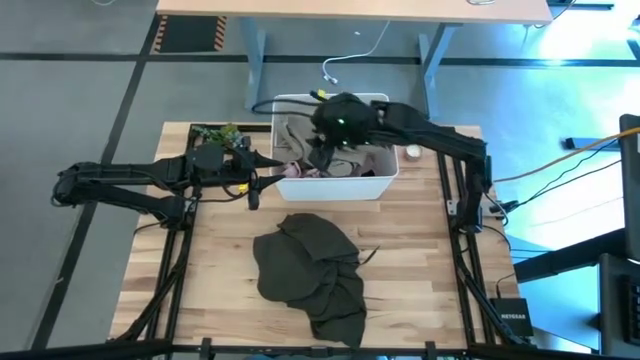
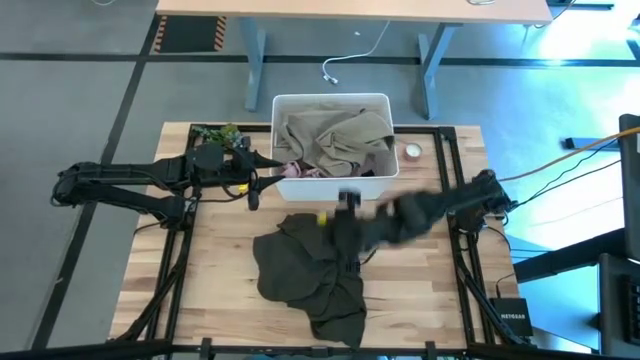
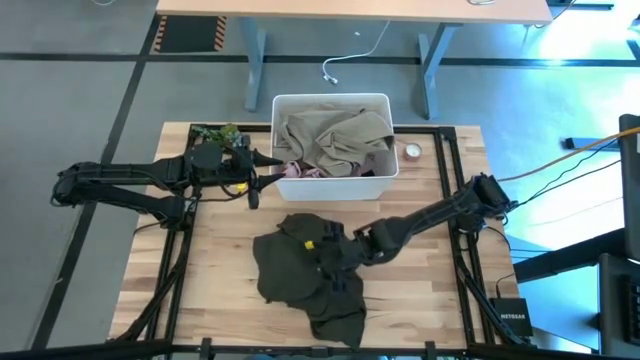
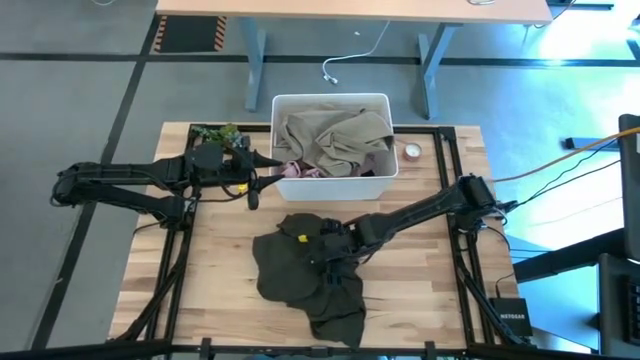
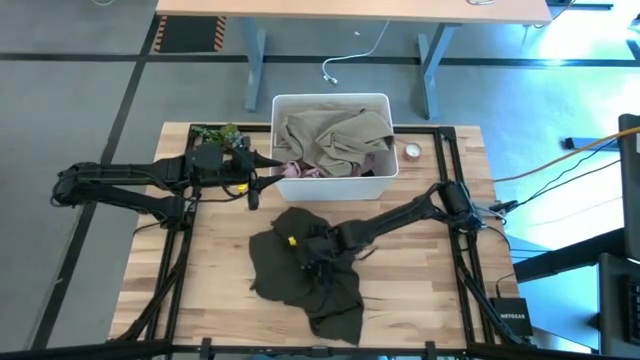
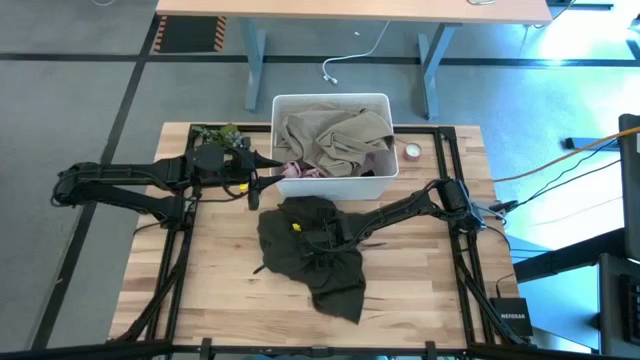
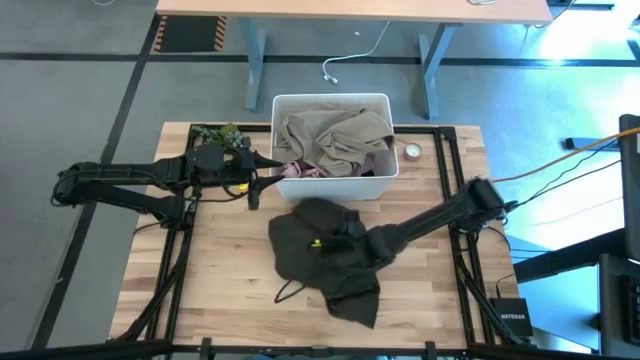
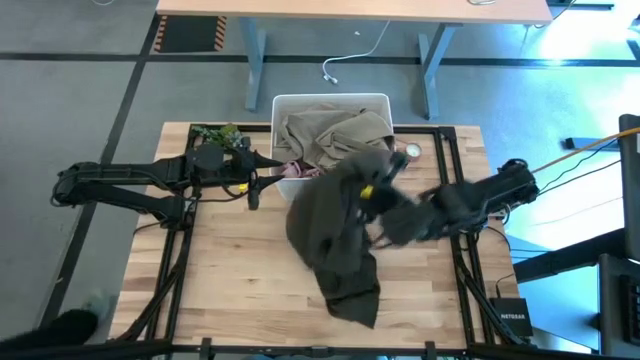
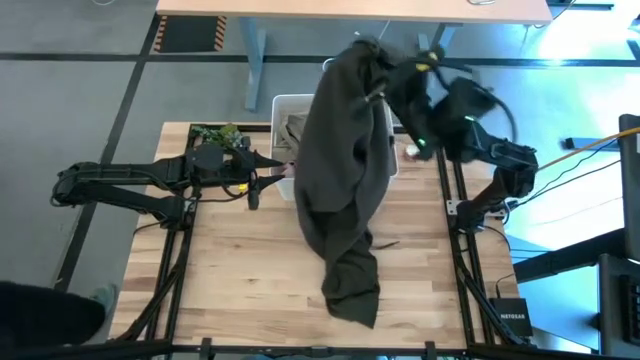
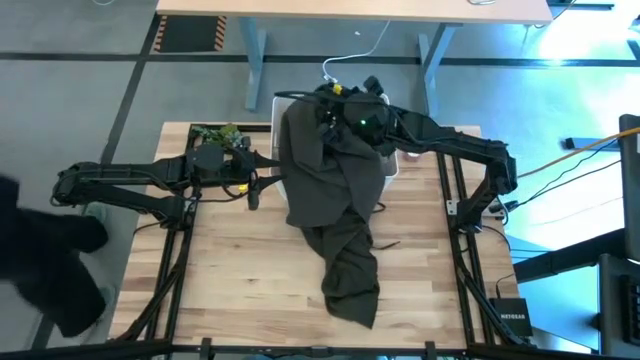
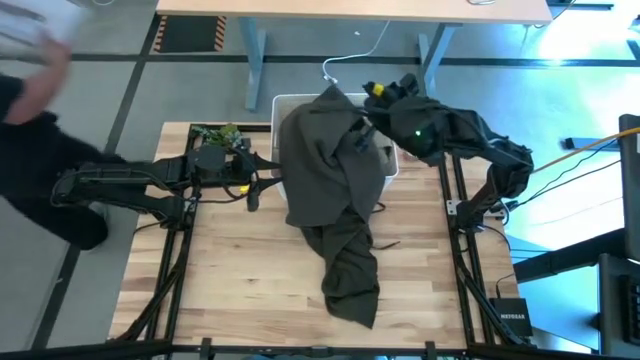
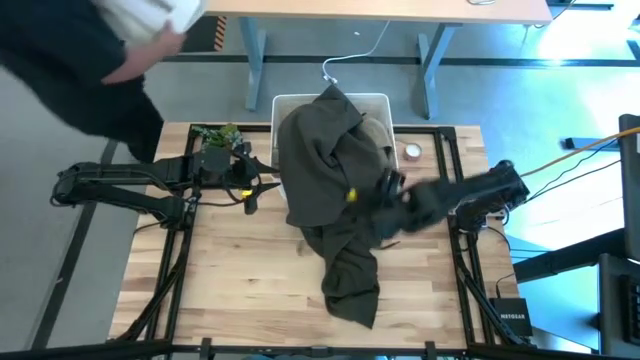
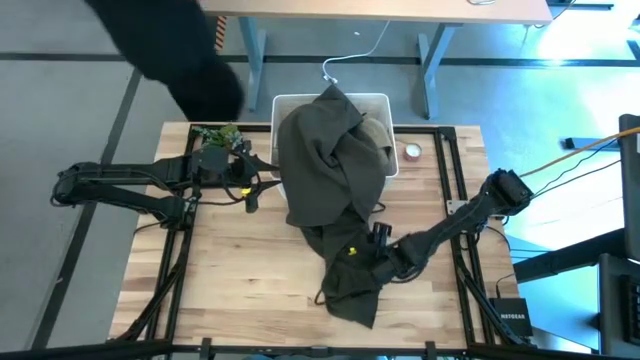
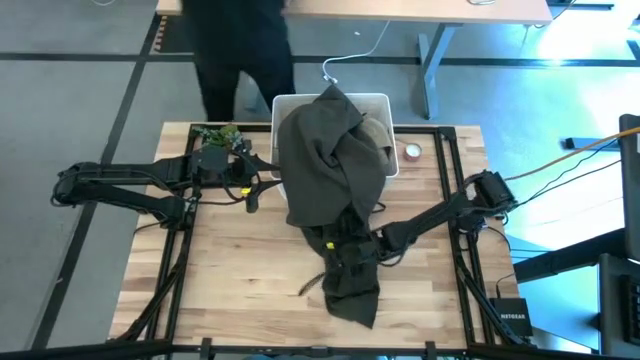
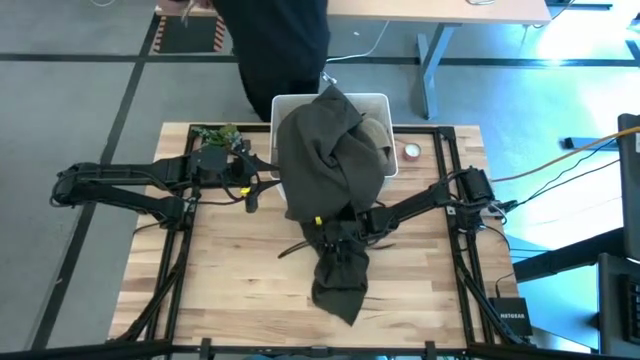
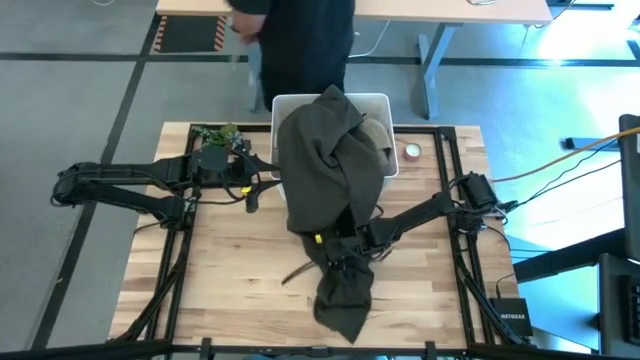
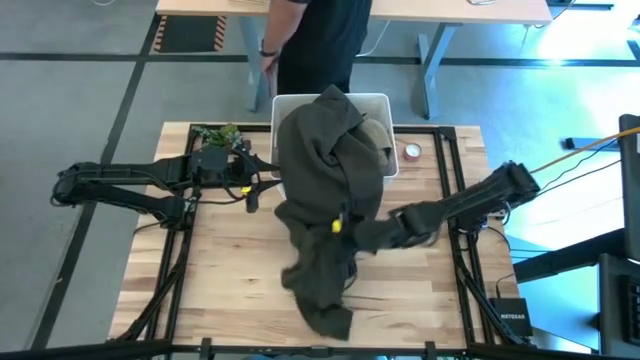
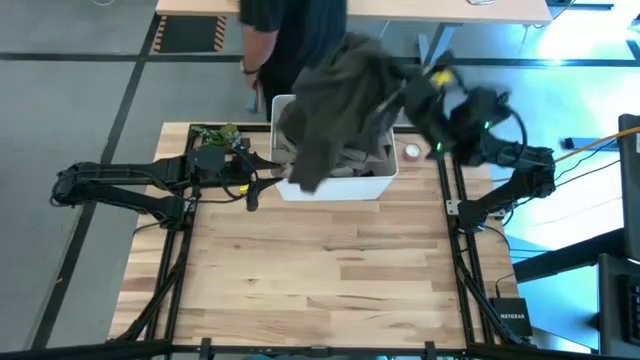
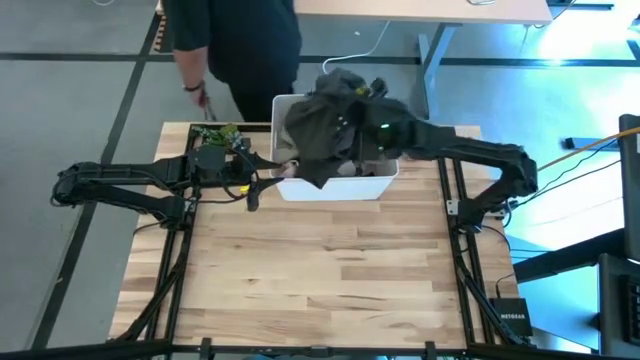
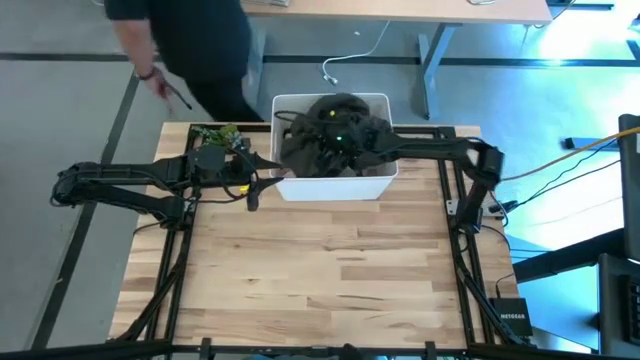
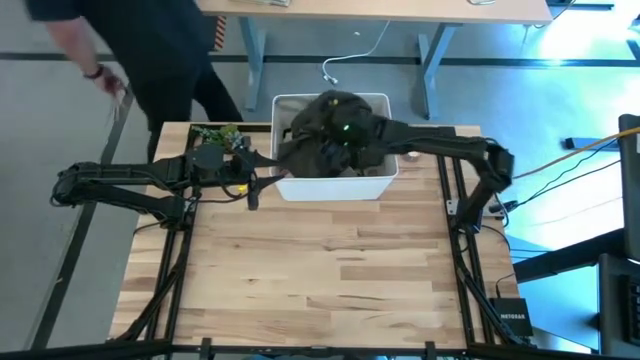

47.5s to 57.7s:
Task: Sort clothes
Put the gray sweatshirt into the white laundry bin

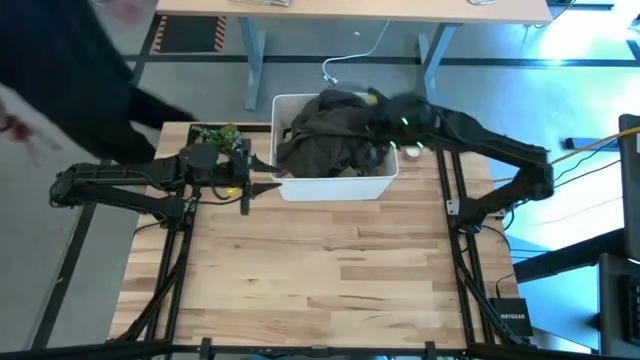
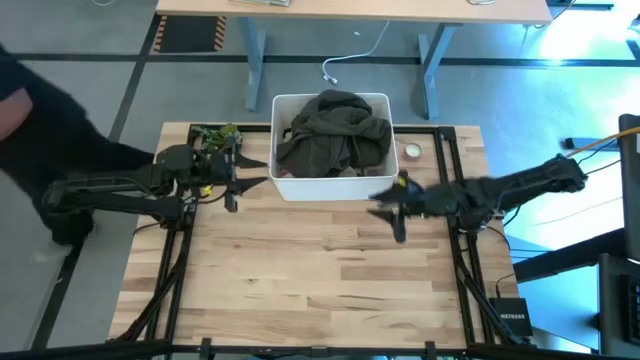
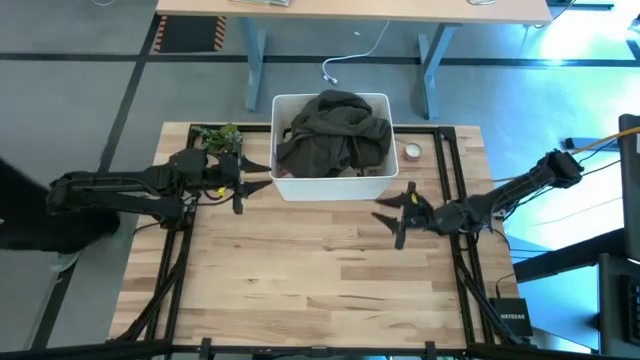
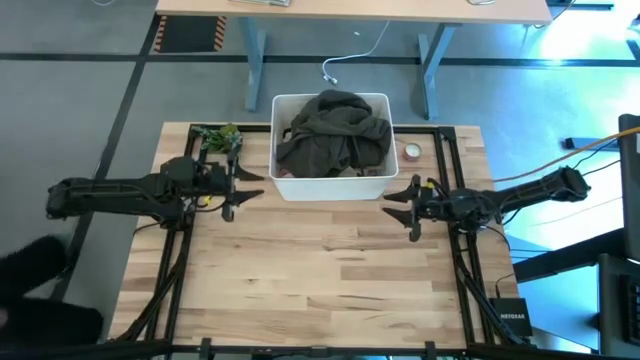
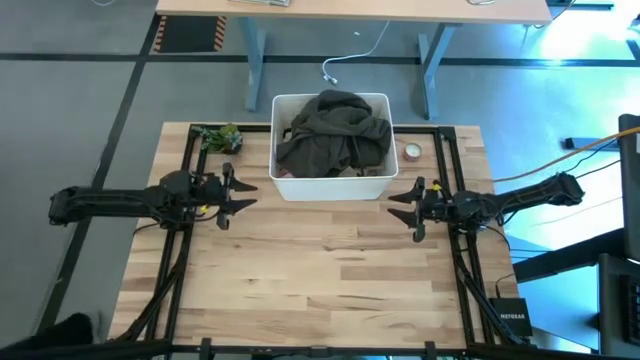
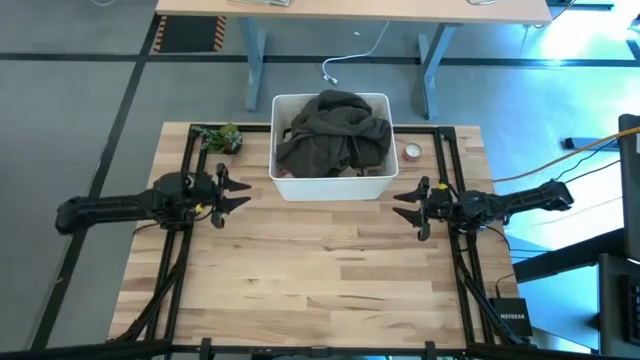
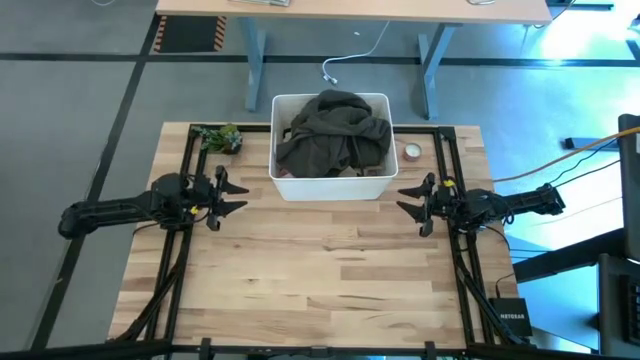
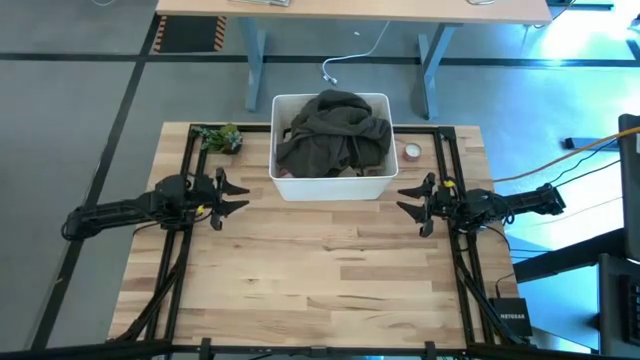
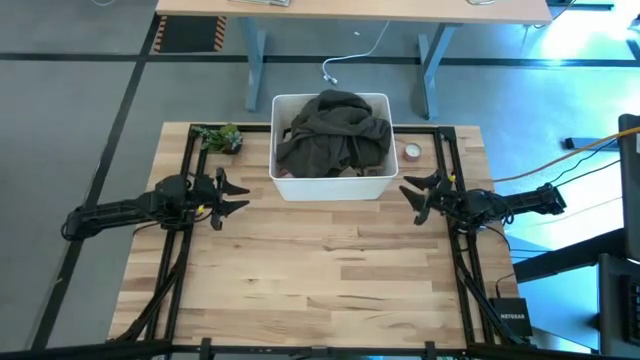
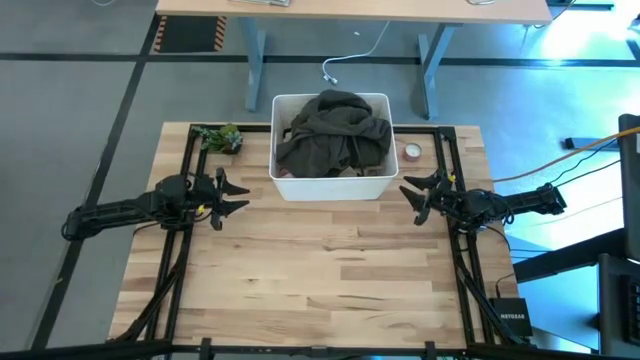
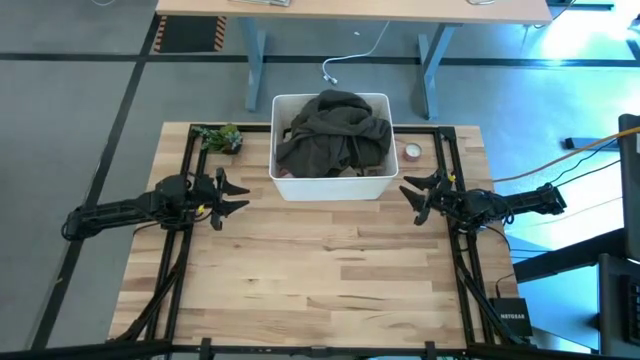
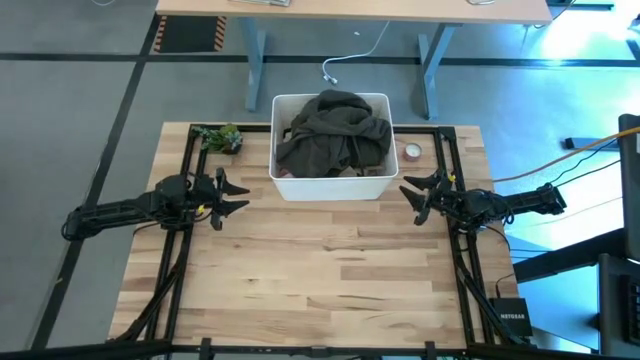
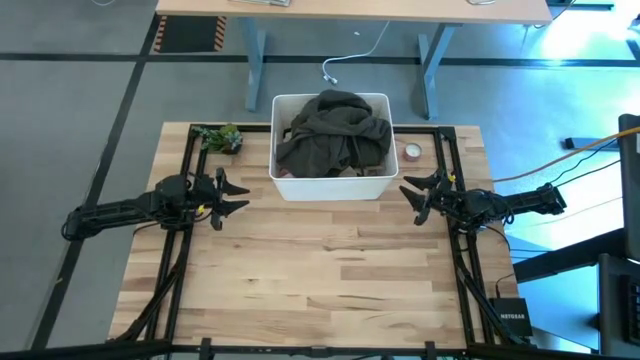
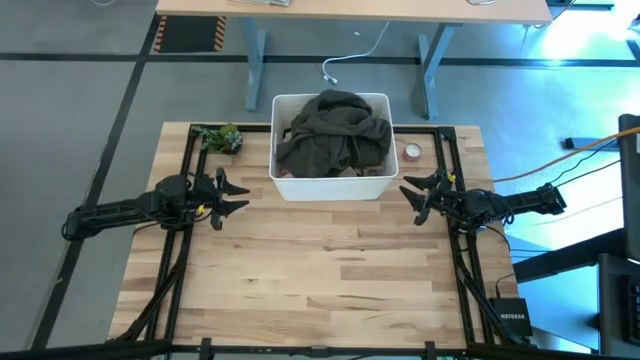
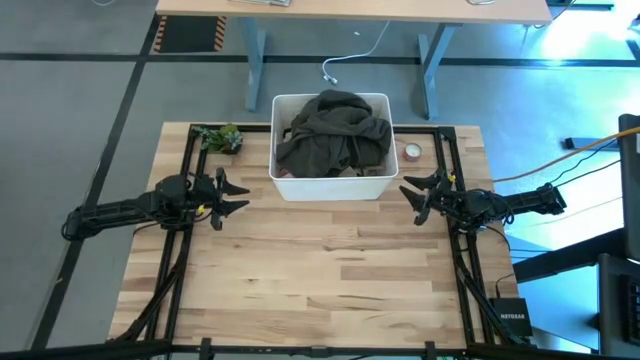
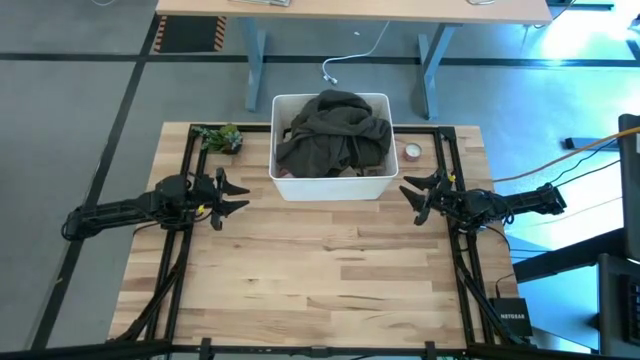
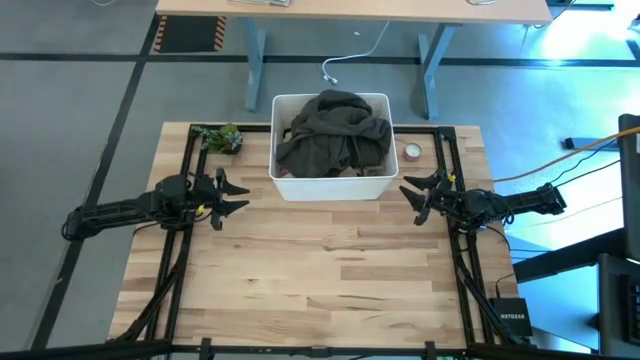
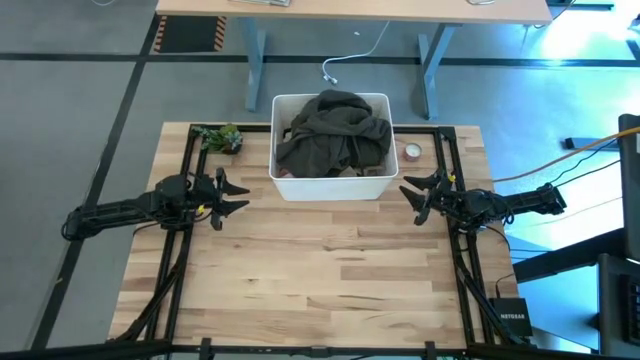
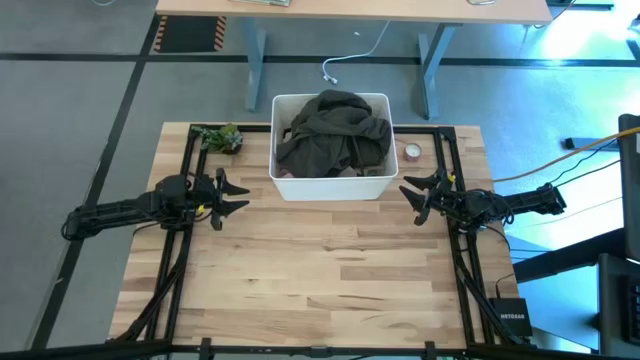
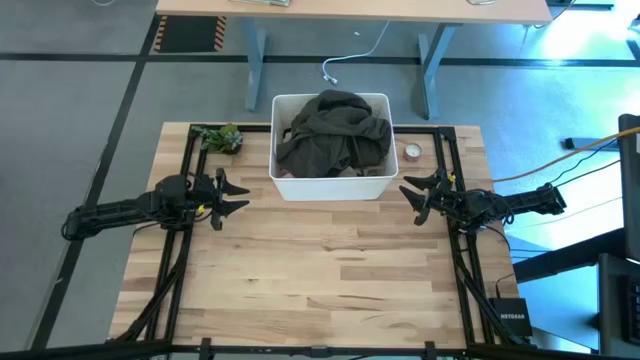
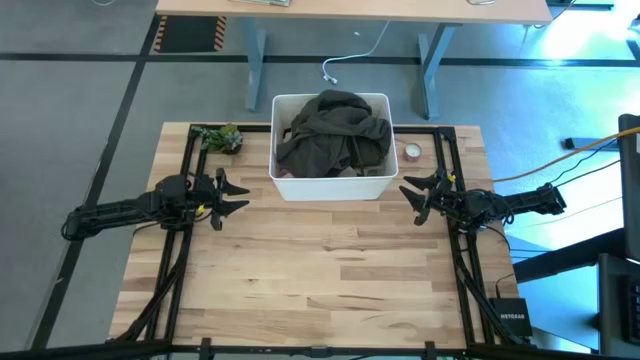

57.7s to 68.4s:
Return to Home Position
